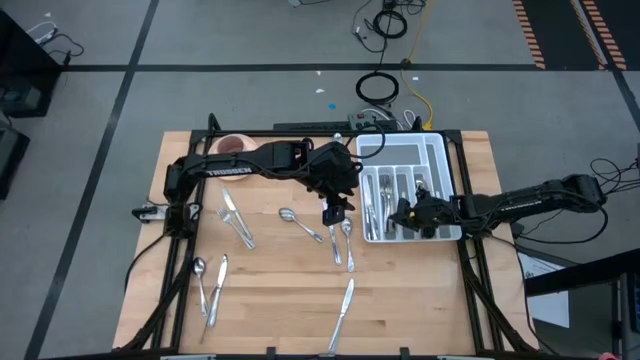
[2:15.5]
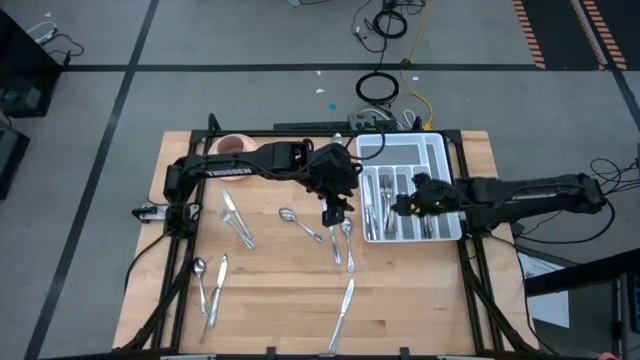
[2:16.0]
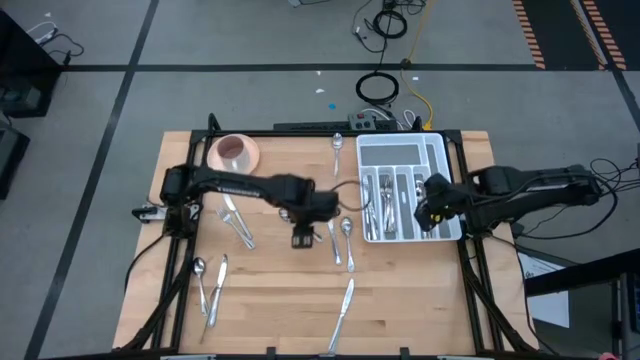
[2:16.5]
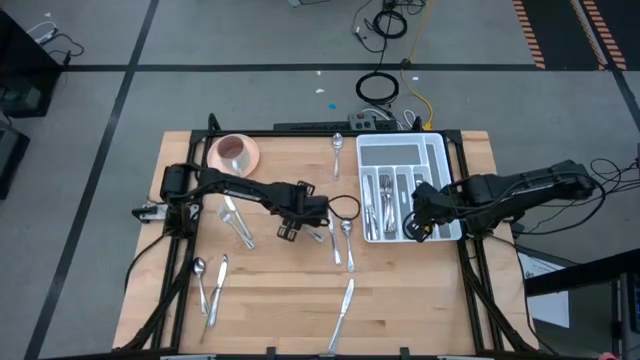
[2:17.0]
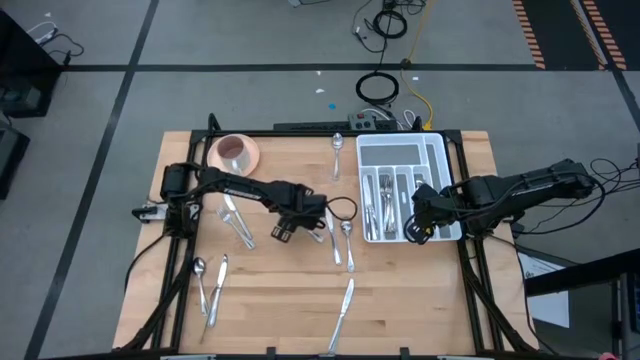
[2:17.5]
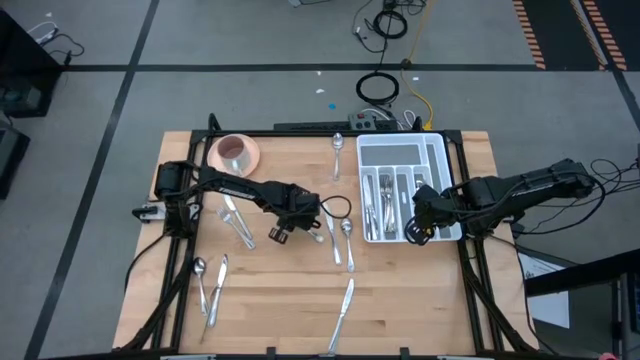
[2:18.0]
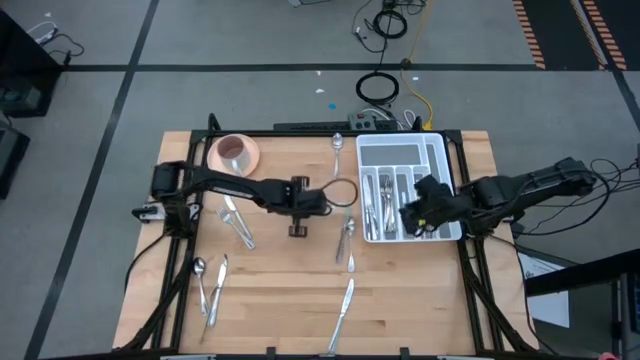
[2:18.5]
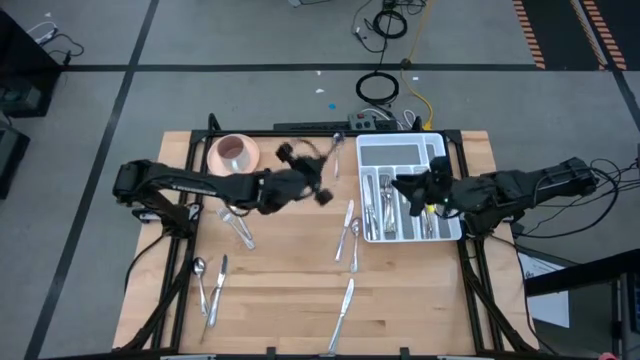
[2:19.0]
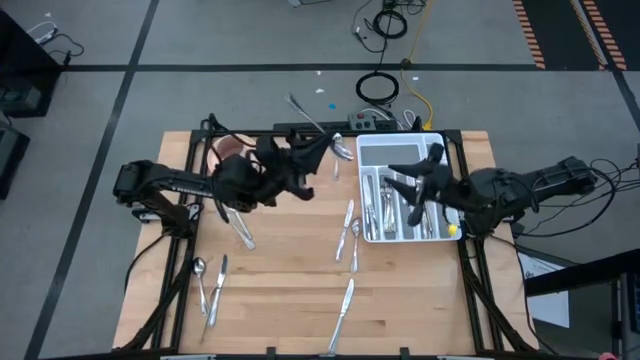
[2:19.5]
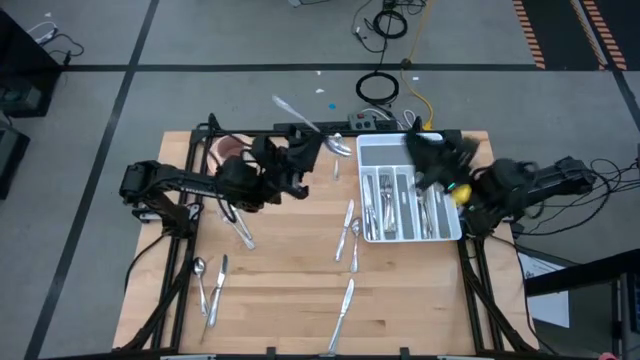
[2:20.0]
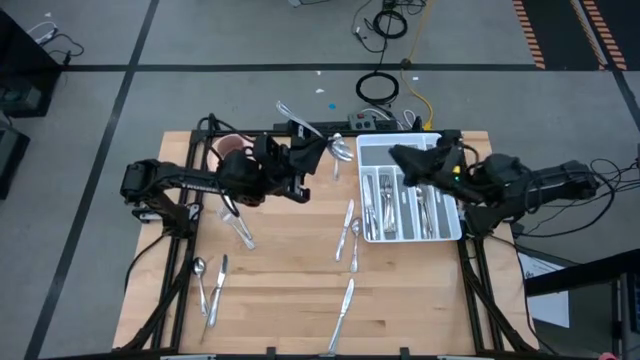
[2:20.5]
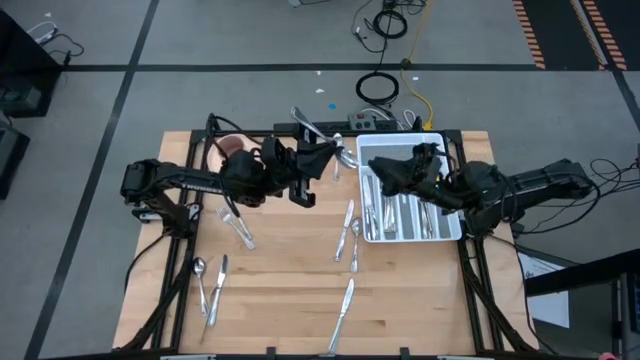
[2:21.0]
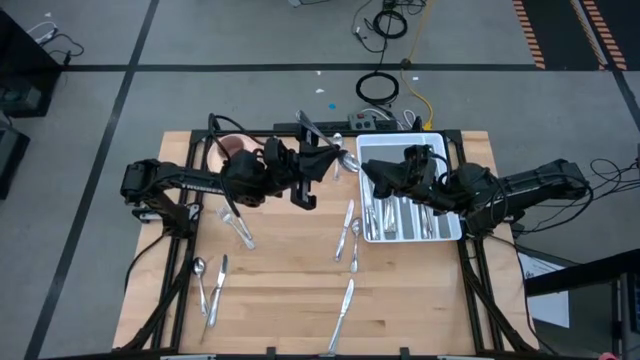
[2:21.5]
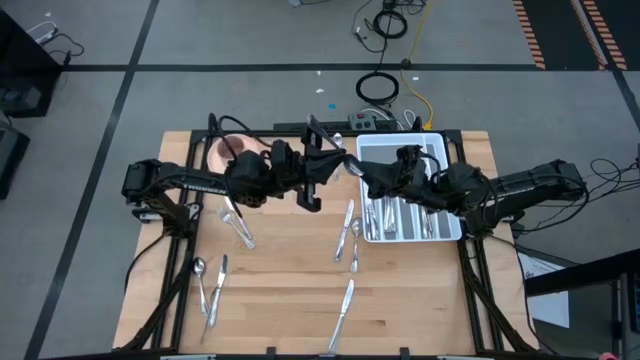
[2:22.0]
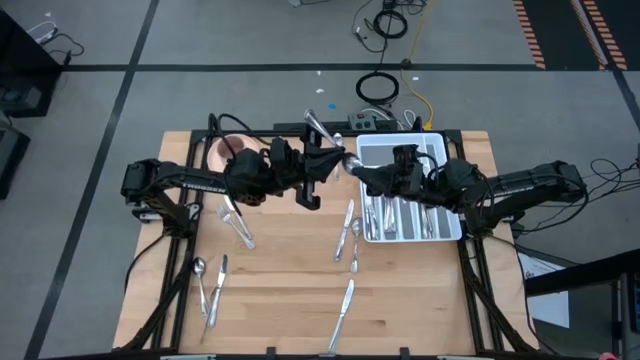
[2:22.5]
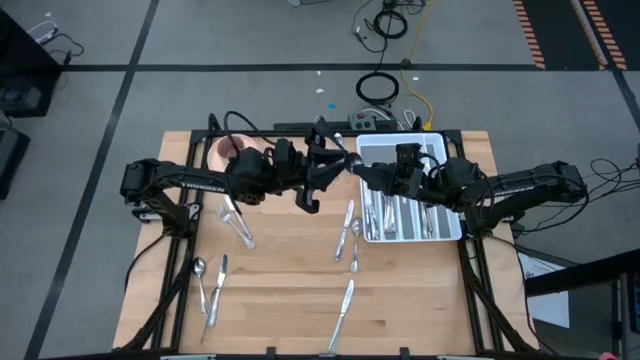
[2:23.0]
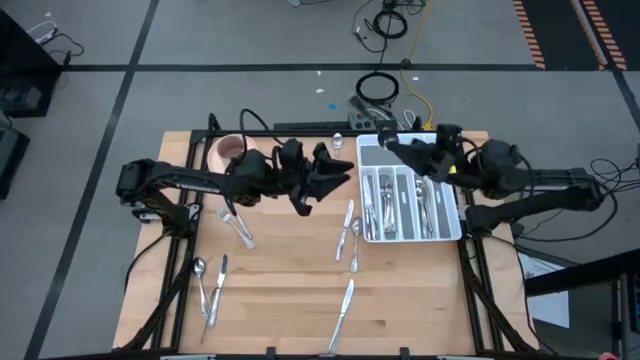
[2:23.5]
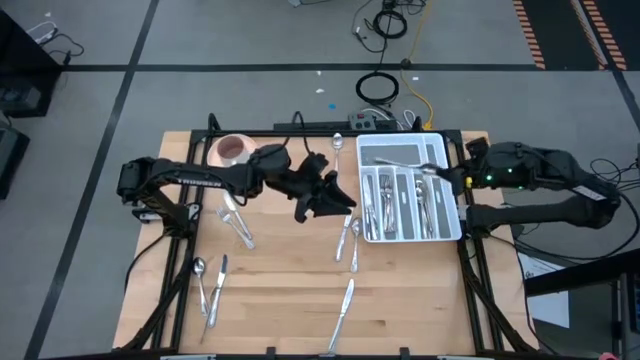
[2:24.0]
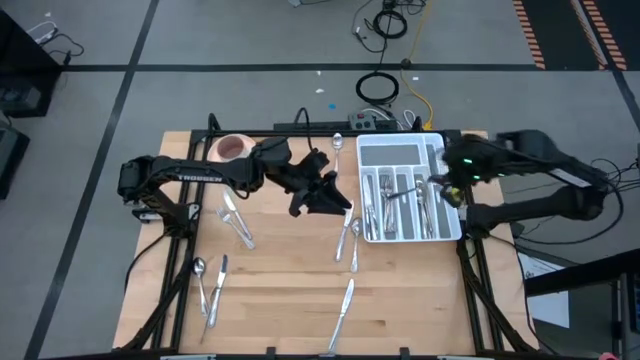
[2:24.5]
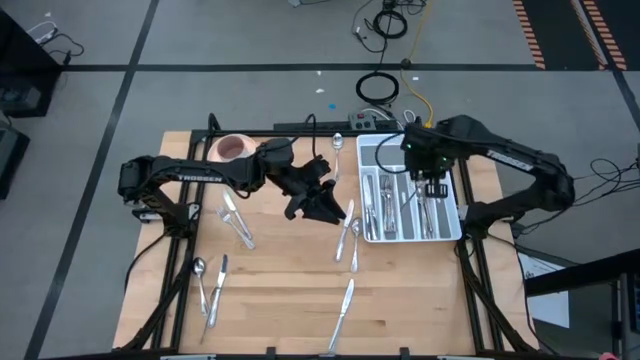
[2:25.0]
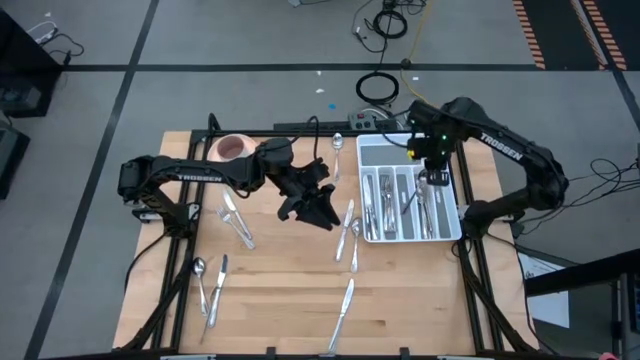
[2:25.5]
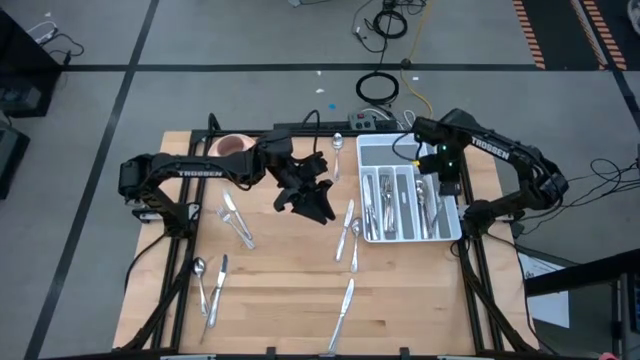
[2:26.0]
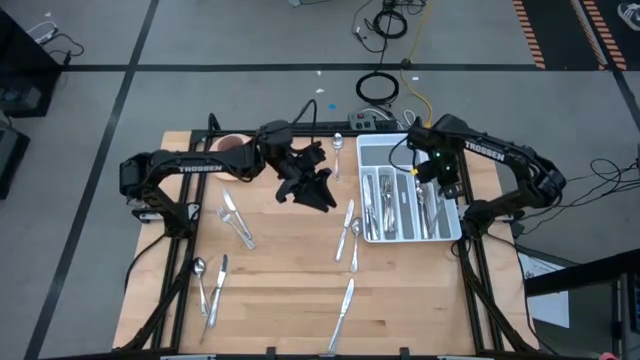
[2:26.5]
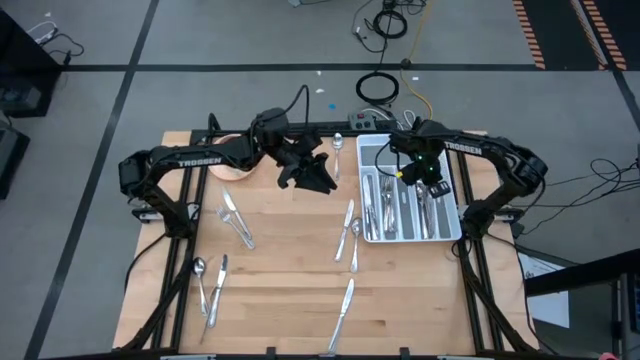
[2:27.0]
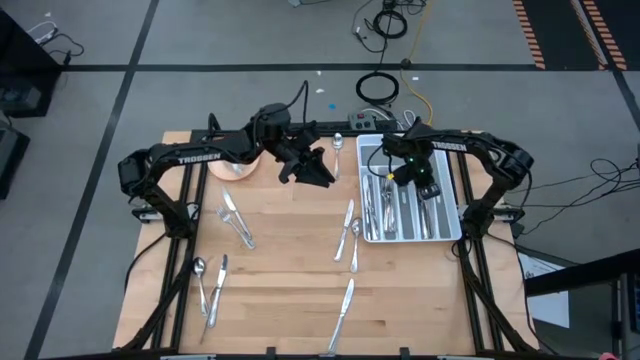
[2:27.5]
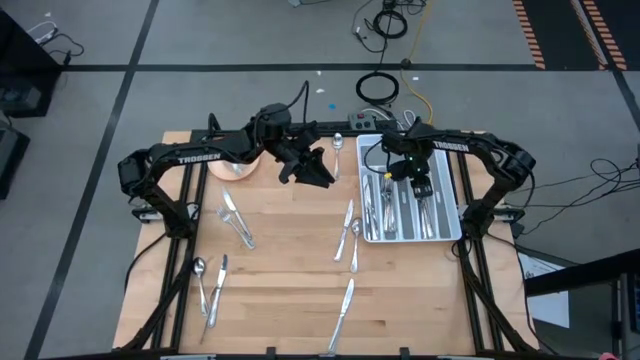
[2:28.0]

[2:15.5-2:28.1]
Task: Sort silverware
Put the silver spoon into the silverware rack

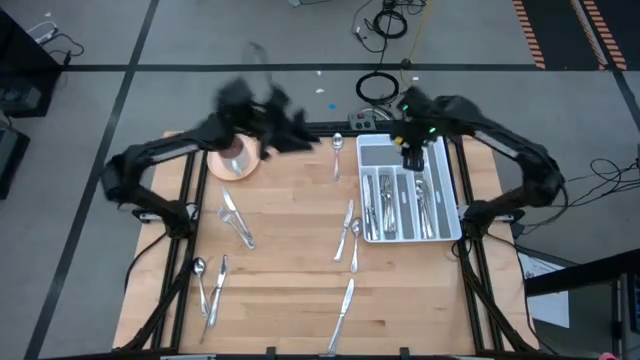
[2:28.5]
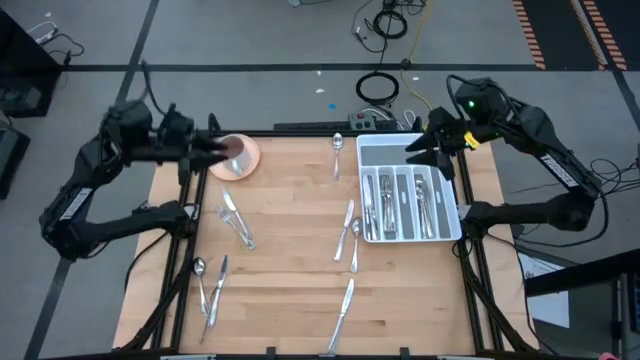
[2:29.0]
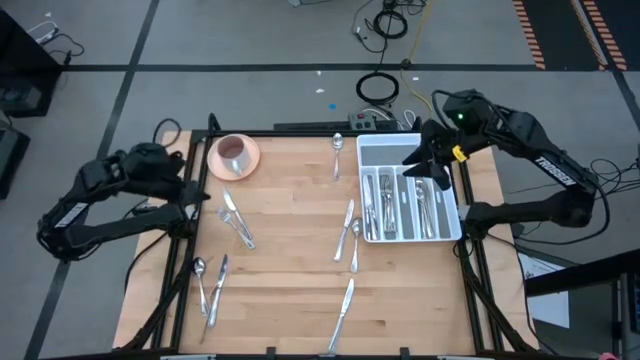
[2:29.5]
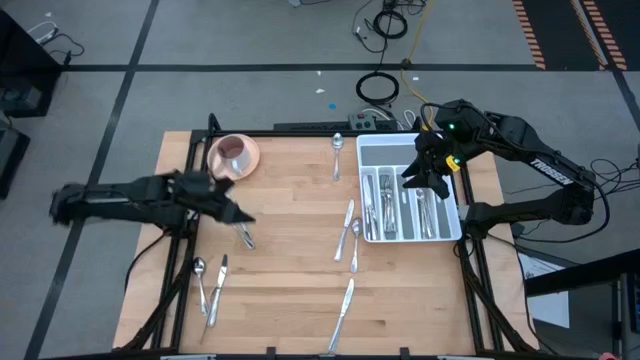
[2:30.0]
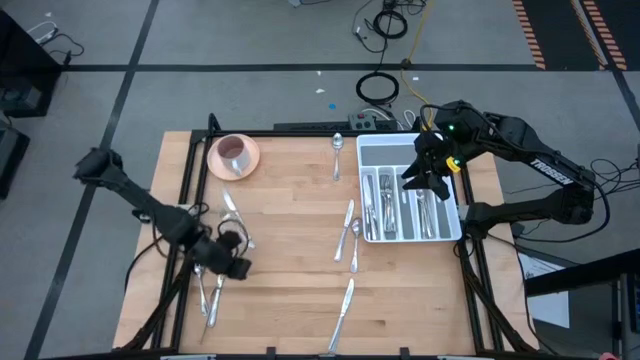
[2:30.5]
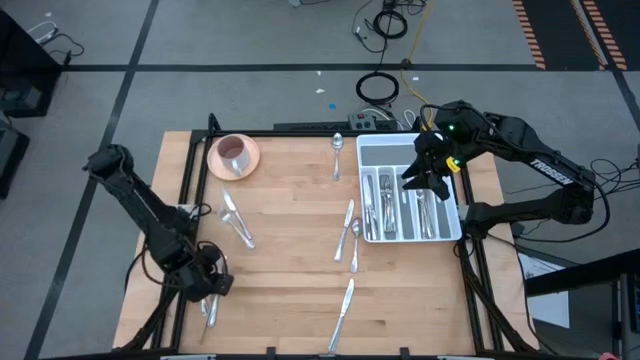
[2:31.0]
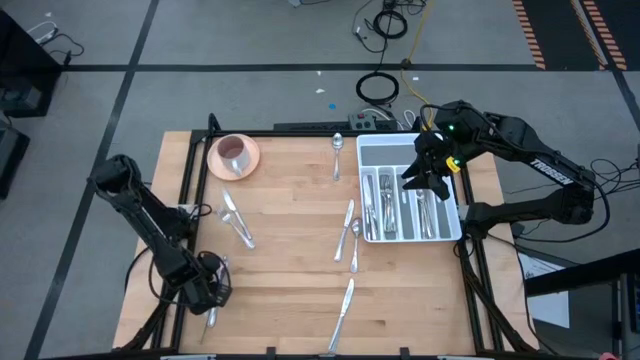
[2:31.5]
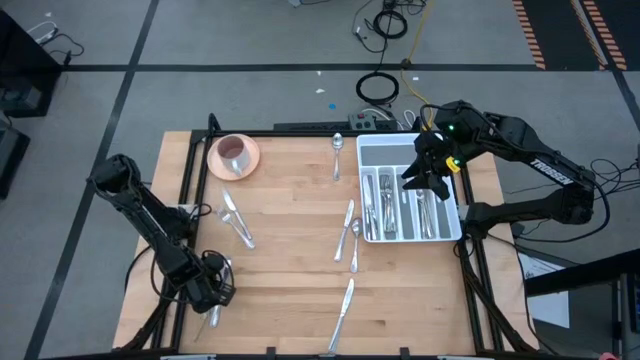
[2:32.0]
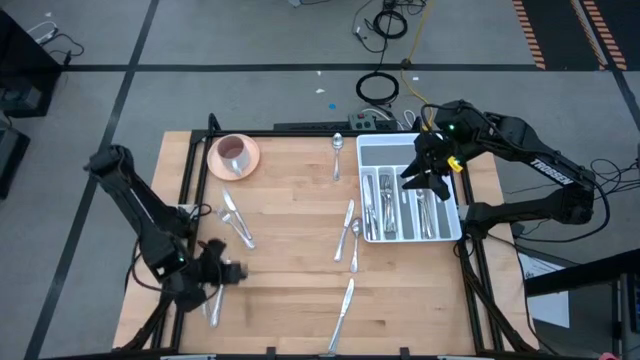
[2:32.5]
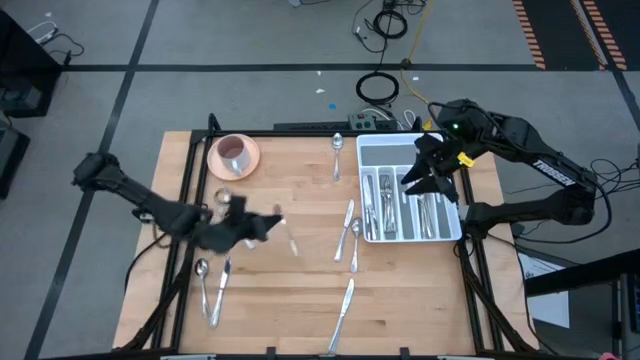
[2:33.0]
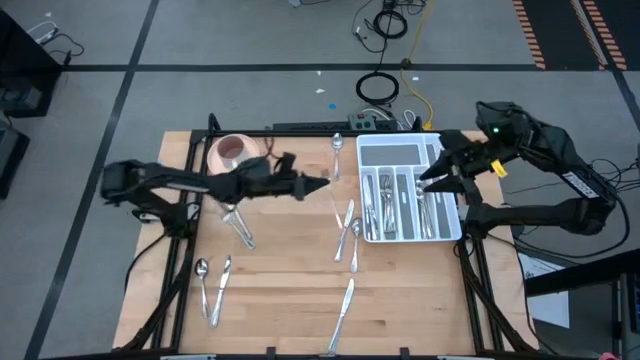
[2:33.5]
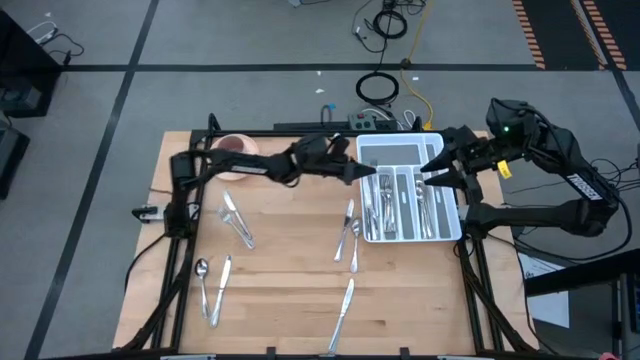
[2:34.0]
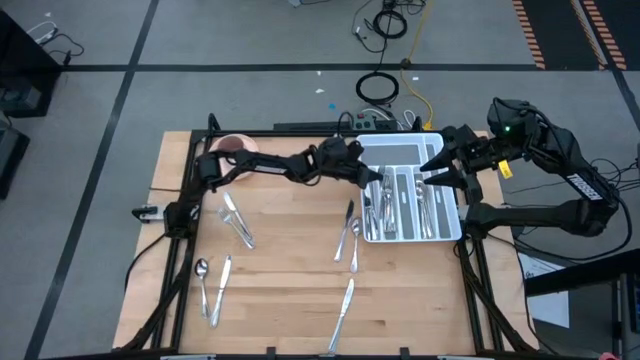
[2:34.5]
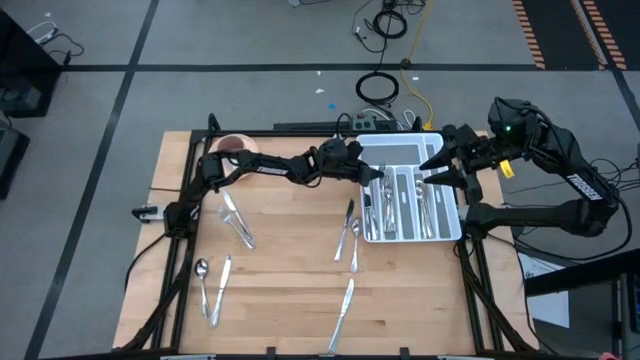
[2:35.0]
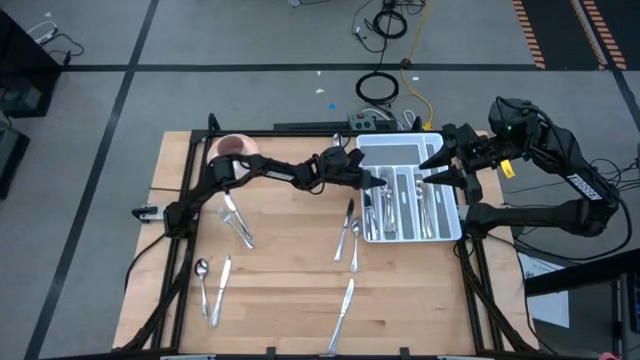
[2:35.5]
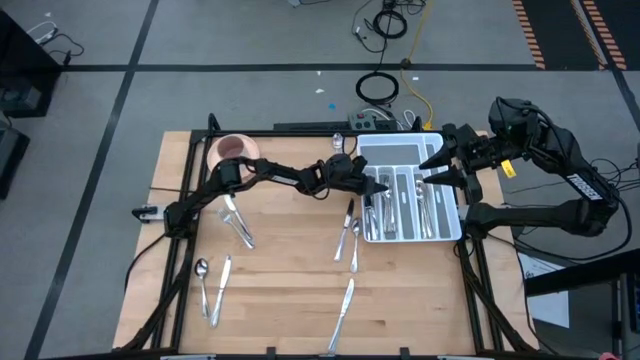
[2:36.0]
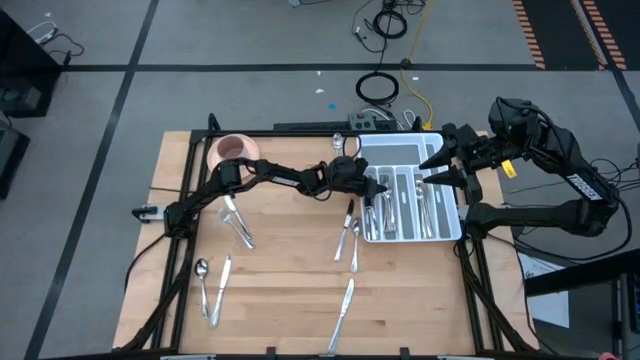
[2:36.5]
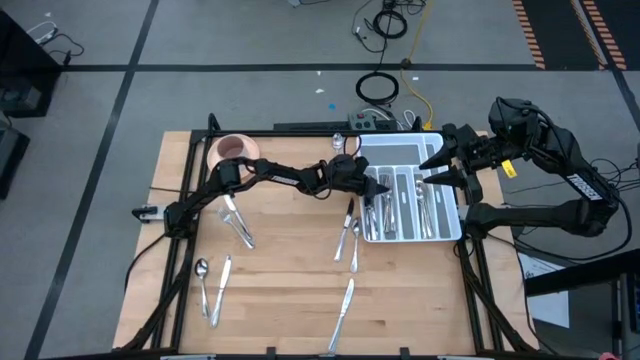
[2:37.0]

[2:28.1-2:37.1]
Put the silver fork into the silverware rack
